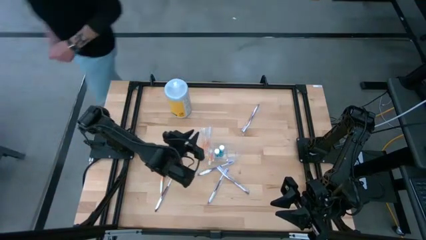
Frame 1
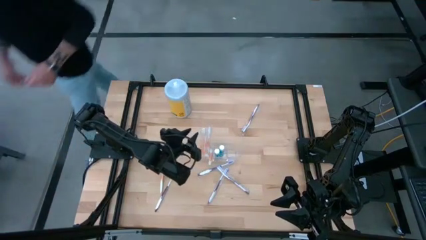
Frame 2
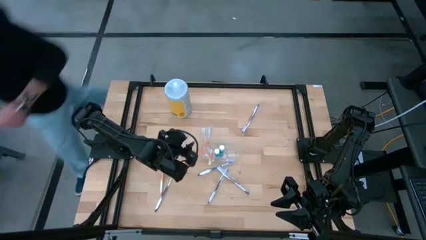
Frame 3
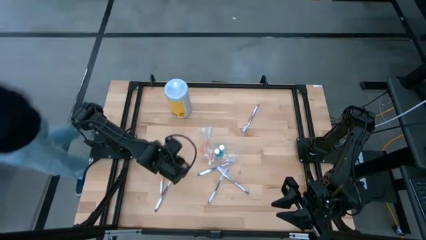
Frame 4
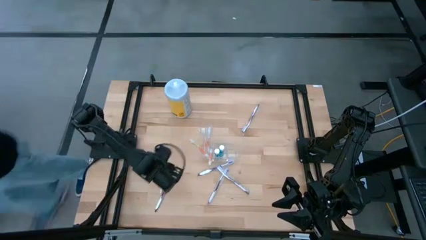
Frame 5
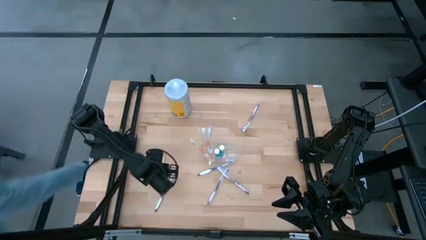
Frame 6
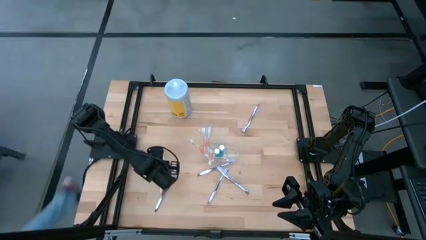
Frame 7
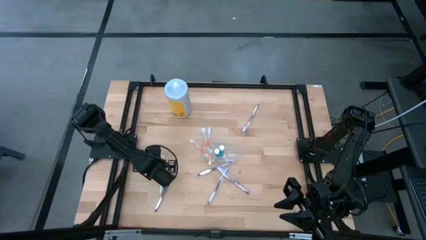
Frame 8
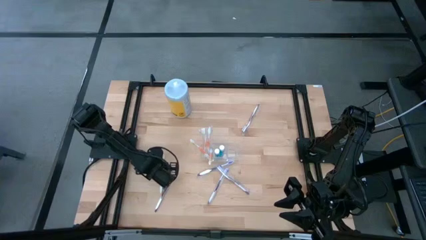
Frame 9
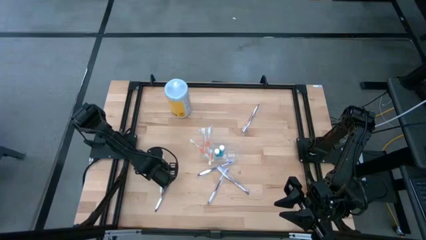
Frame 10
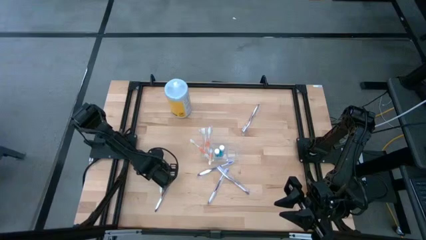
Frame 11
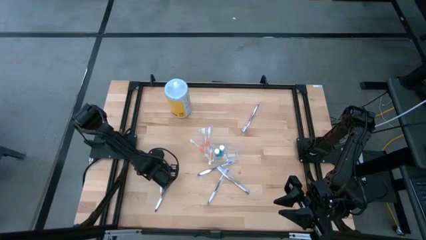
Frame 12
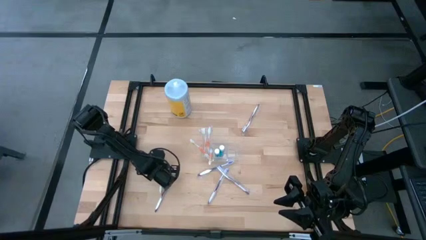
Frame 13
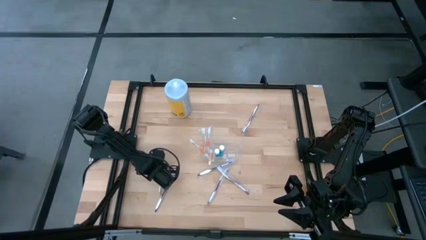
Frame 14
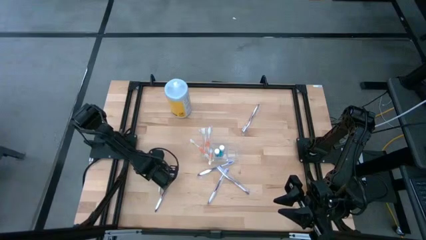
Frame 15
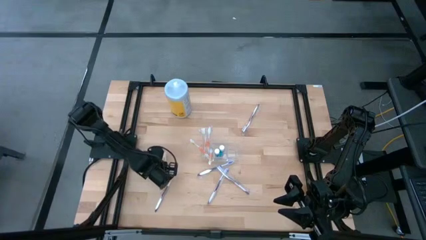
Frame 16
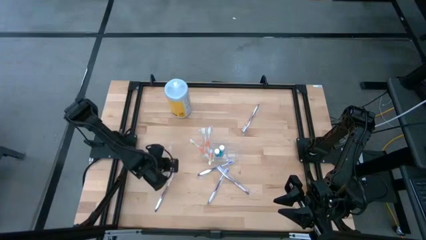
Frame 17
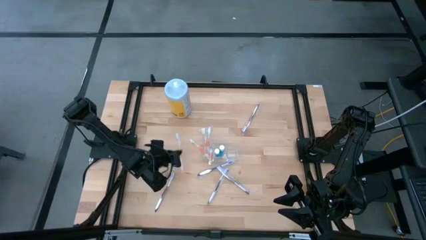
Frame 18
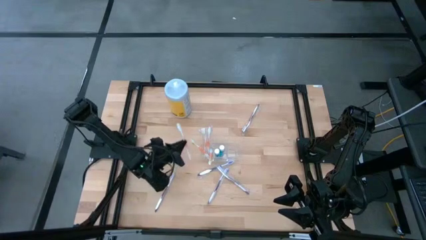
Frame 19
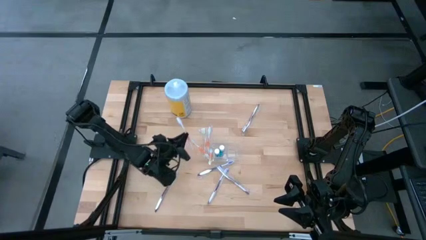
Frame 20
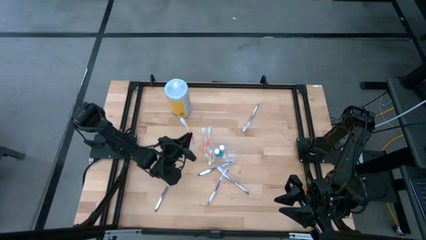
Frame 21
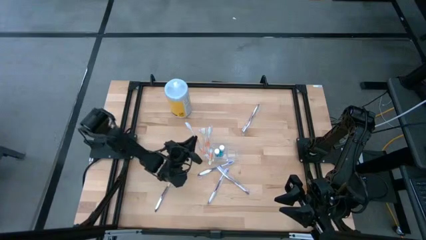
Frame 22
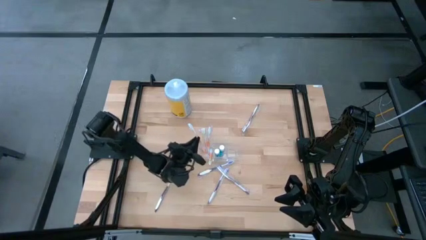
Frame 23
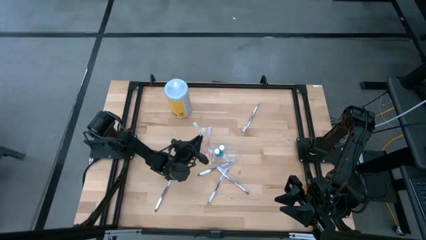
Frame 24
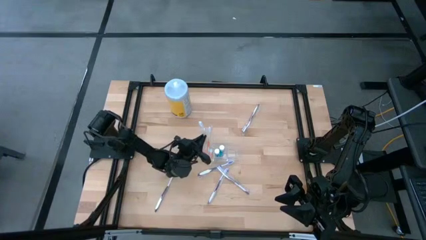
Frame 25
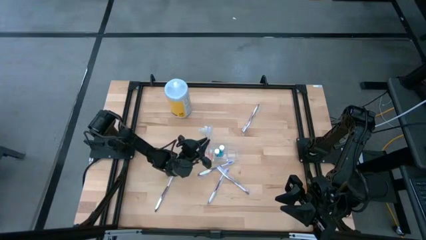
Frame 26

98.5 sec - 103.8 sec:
Task: Pick & Place toothbrushing station
Put the white and orange toothbrush into the left compartment of the transparent organizer

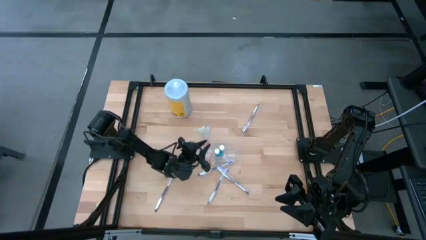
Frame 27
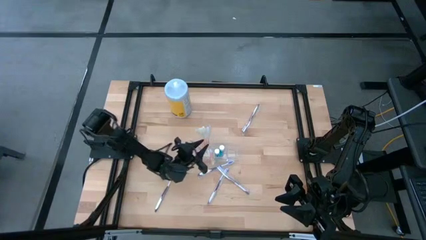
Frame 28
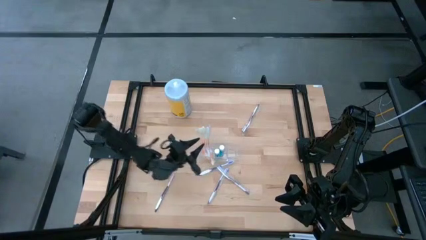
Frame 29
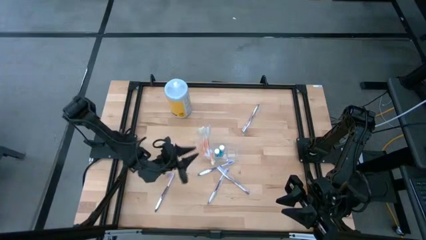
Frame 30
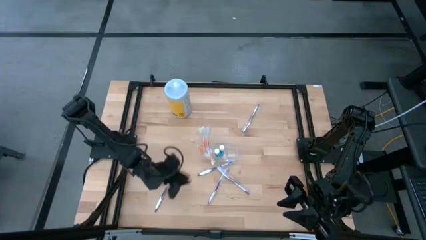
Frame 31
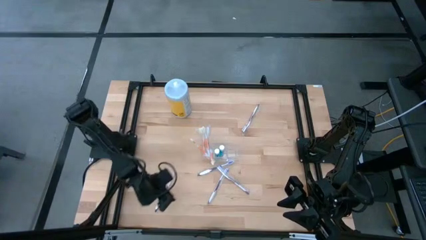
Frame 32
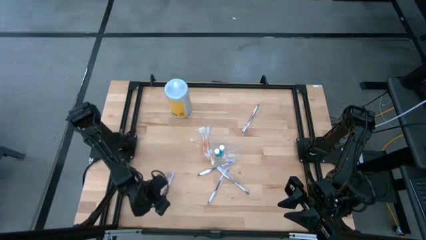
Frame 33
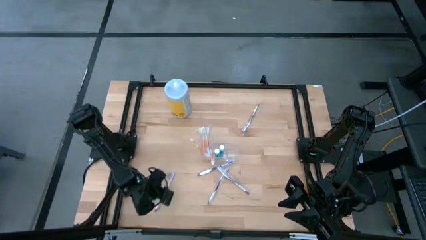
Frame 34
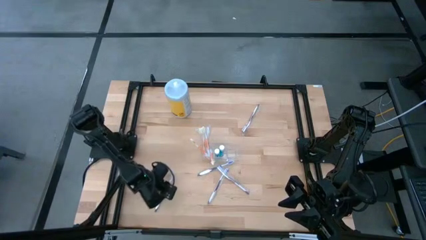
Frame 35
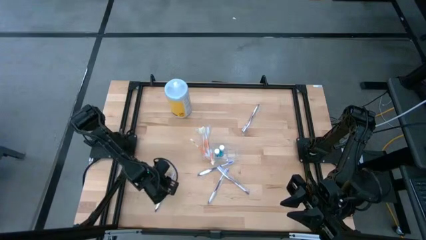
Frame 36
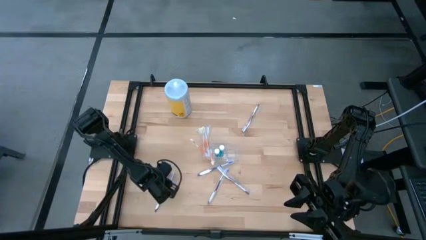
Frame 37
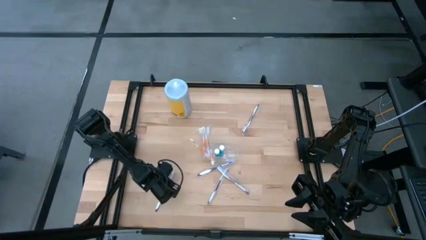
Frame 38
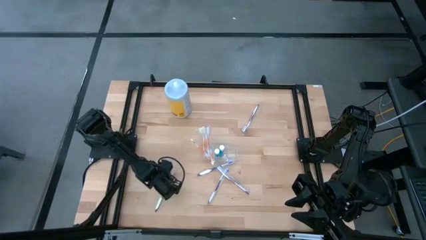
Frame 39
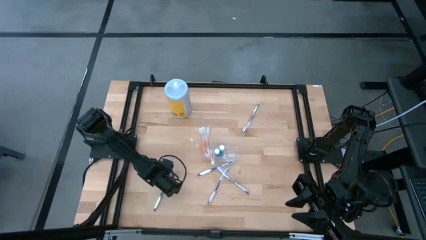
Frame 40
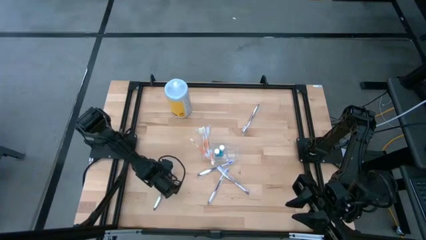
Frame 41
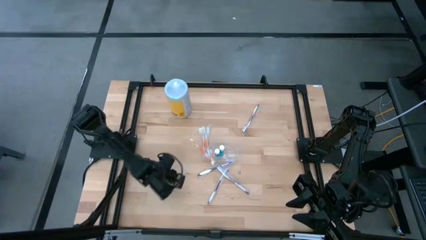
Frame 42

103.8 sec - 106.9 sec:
Put the white and violet toothbrush into the right compartment of the transparent organizer

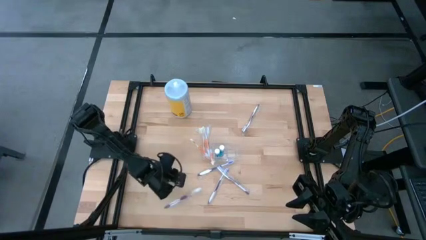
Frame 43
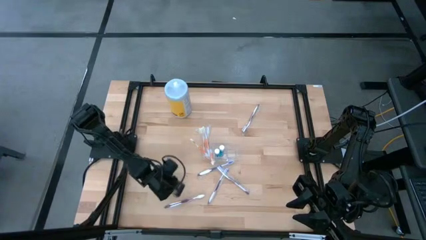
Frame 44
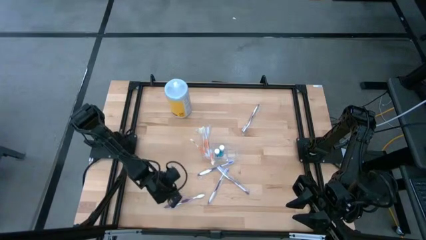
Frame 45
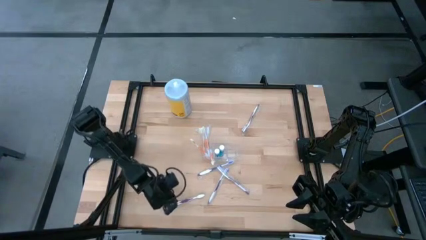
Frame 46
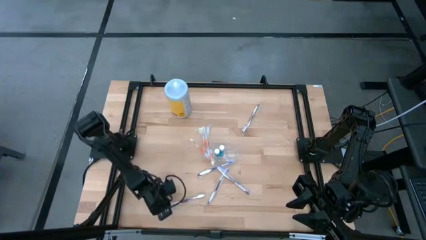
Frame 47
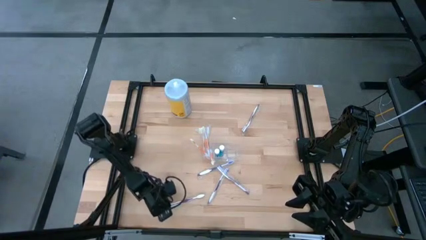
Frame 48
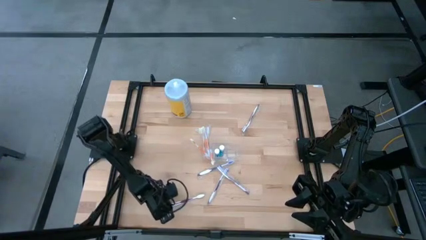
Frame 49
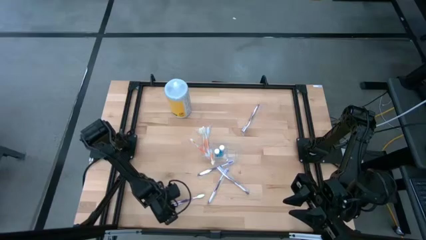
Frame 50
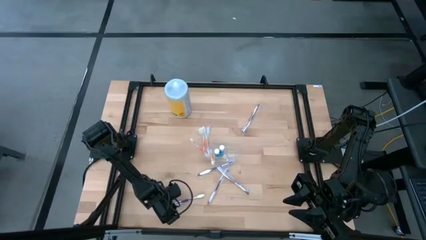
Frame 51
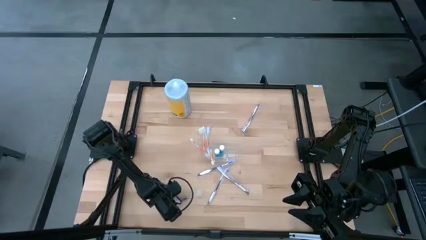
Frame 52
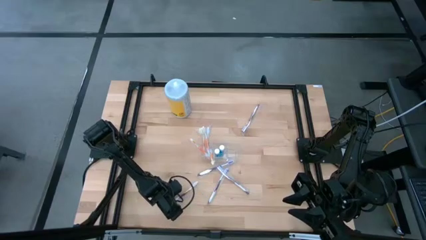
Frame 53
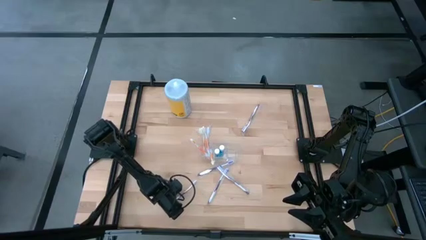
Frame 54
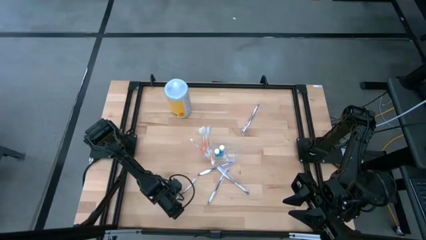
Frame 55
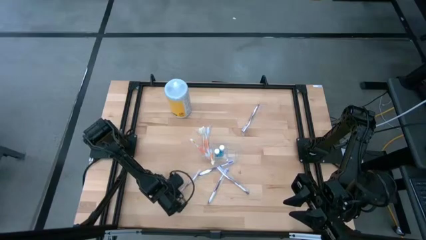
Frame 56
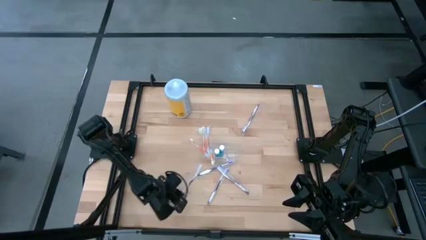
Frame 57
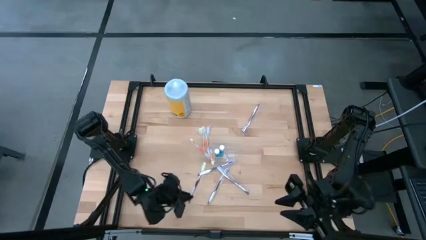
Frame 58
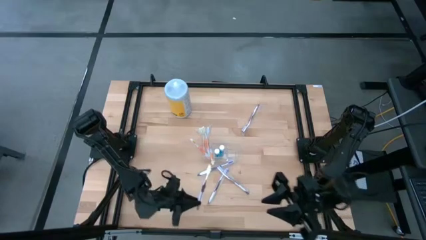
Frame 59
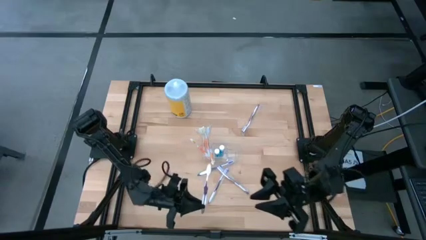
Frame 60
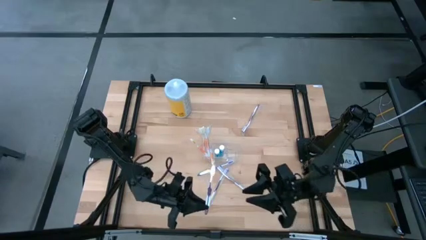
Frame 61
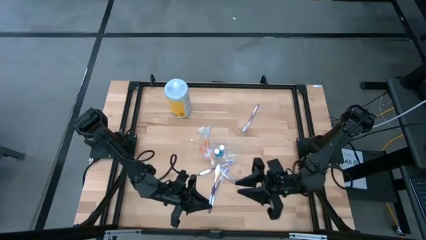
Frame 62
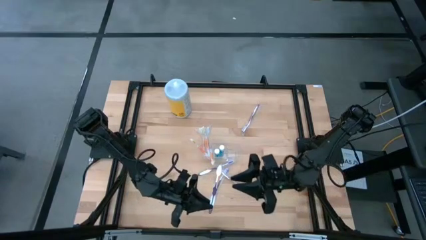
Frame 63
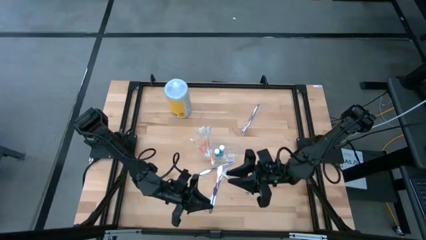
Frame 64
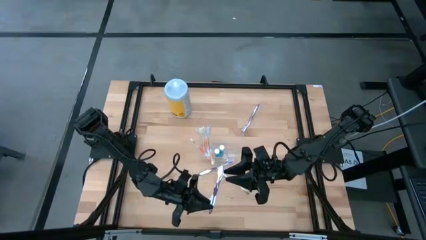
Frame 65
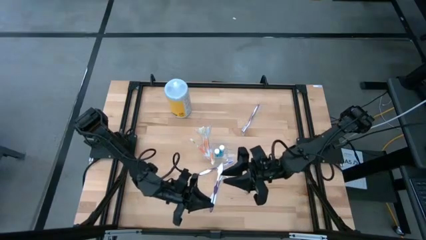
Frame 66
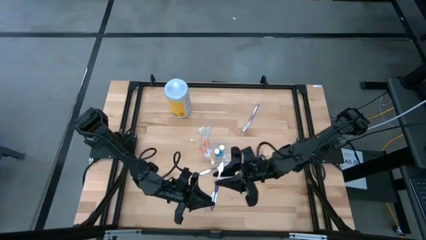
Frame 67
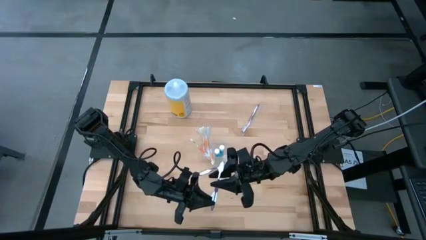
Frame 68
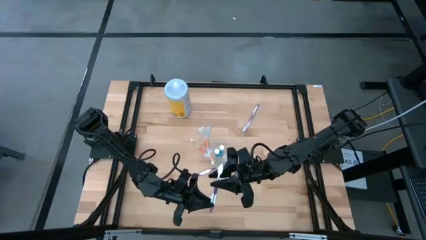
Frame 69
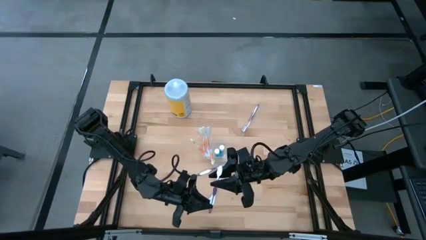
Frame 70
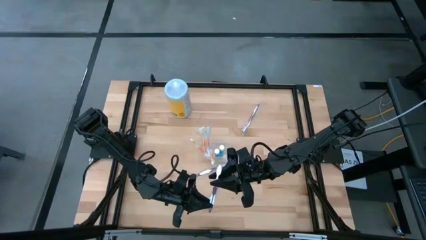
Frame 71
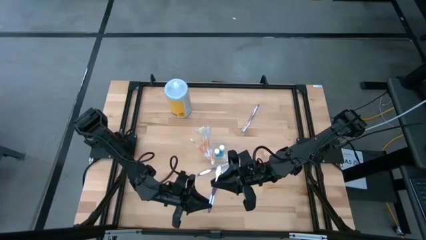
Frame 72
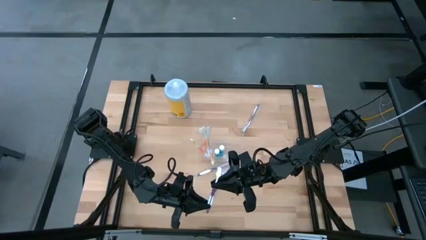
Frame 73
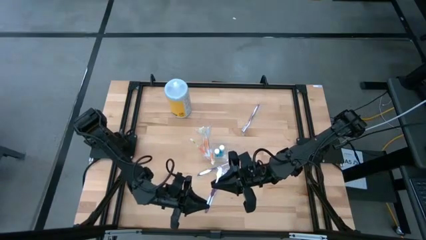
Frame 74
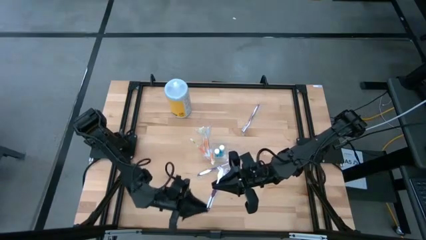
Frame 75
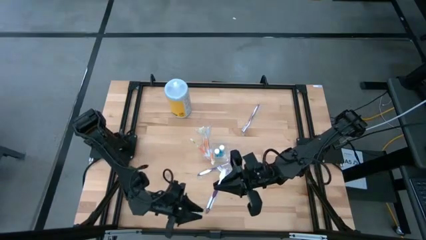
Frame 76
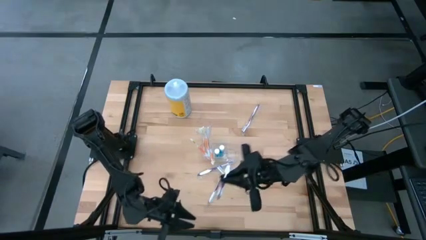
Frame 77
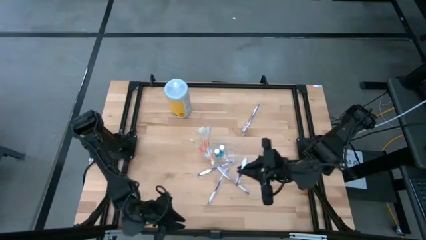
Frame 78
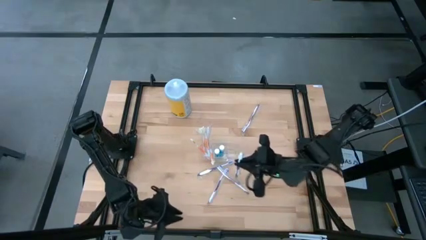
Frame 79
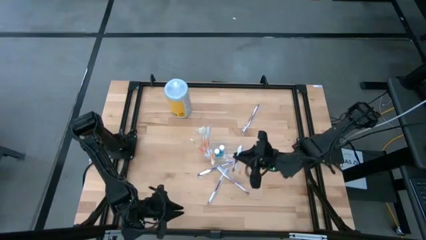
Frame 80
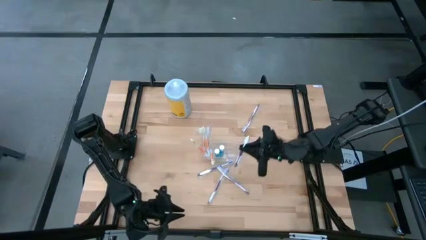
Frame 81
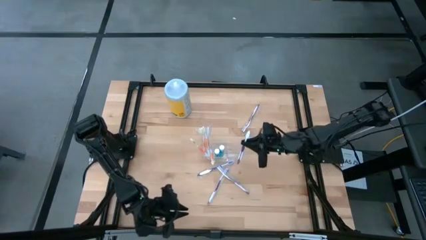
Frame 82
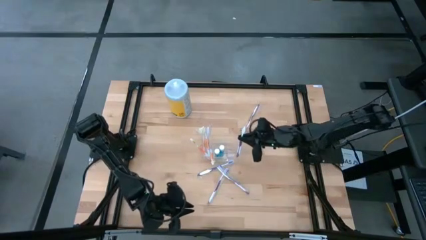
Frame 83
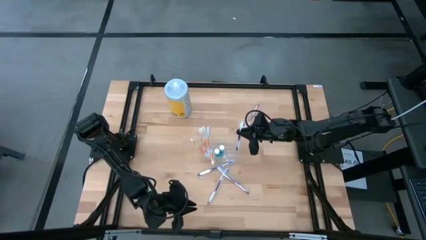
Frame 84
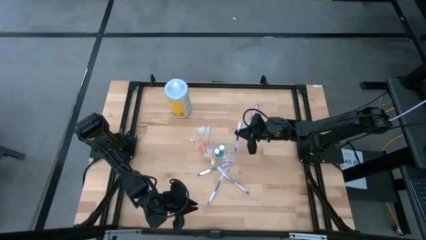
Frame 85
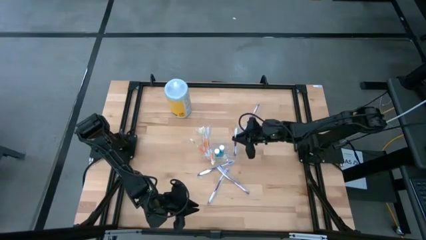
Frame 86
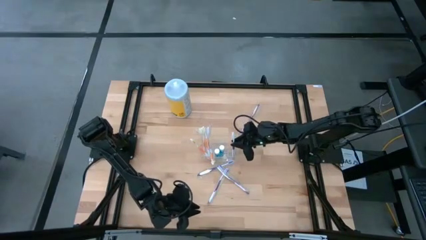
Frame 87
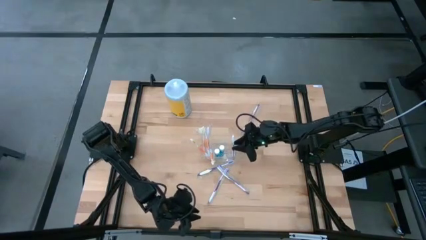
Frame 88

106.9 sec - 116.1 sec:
Put the white and violet toothbrush into the right compartment of the transparent organizer
